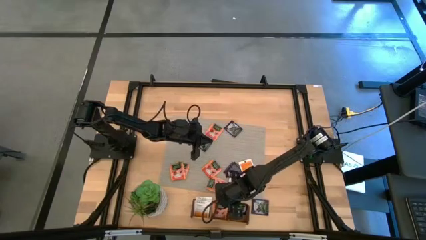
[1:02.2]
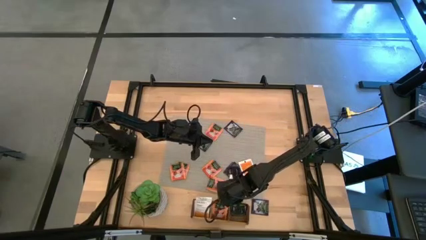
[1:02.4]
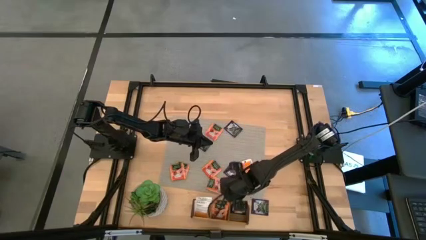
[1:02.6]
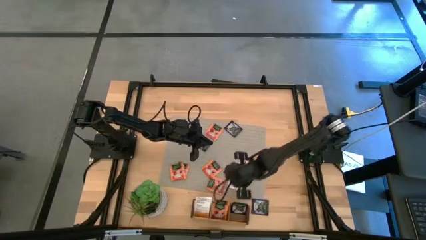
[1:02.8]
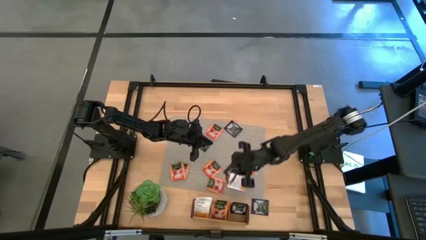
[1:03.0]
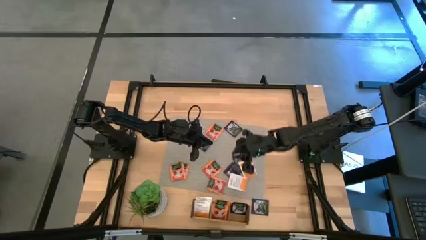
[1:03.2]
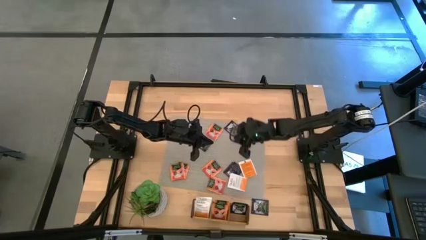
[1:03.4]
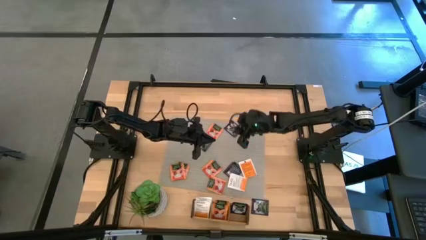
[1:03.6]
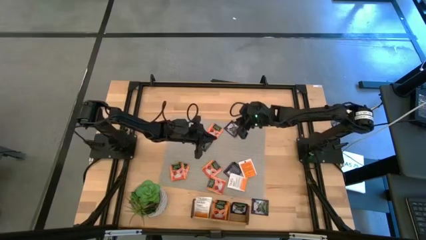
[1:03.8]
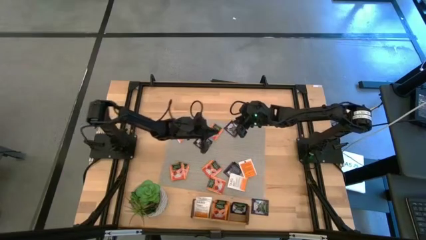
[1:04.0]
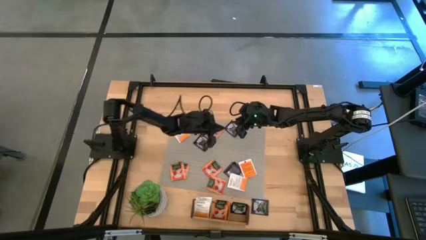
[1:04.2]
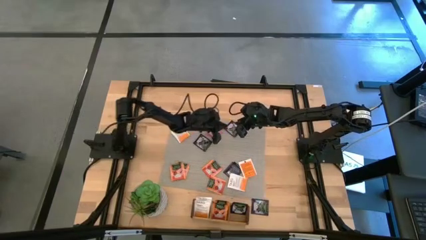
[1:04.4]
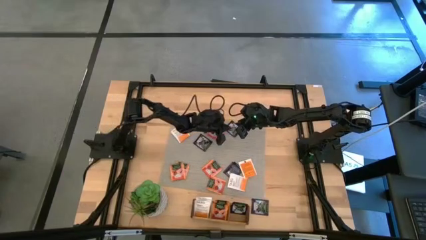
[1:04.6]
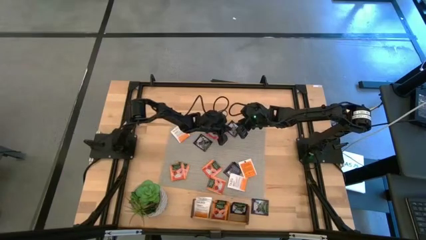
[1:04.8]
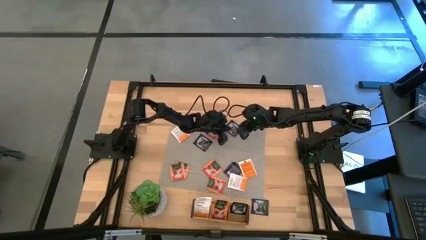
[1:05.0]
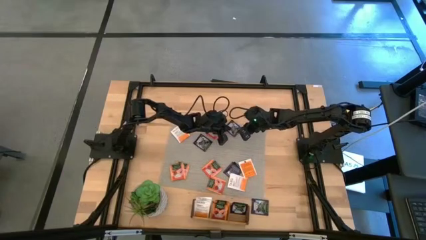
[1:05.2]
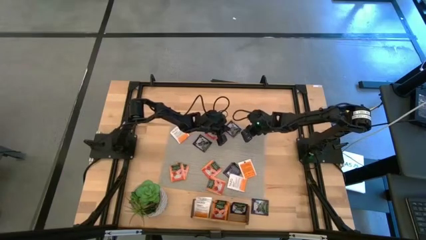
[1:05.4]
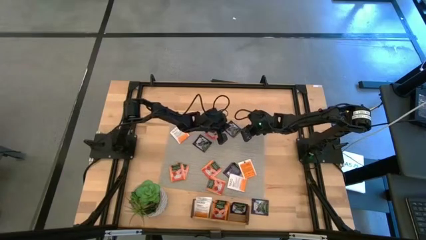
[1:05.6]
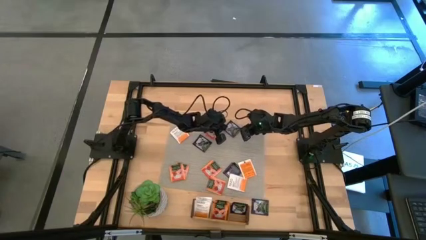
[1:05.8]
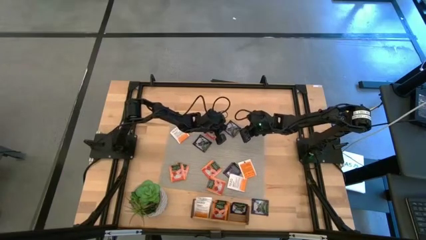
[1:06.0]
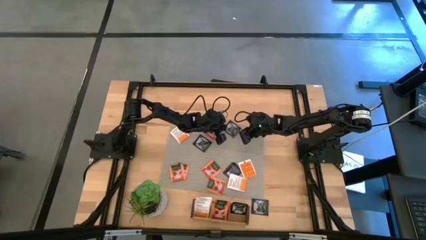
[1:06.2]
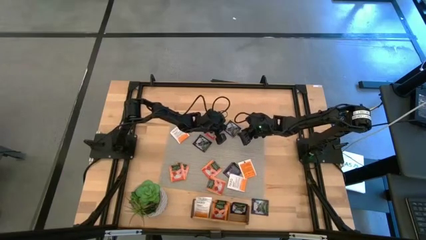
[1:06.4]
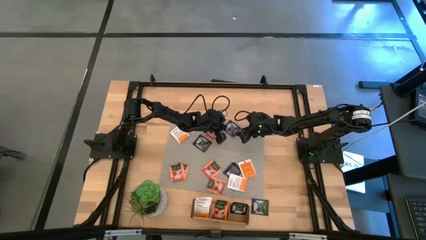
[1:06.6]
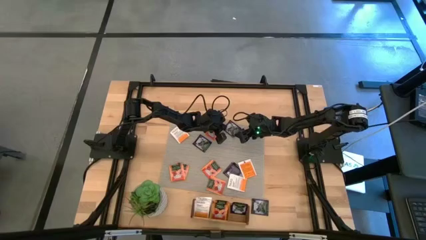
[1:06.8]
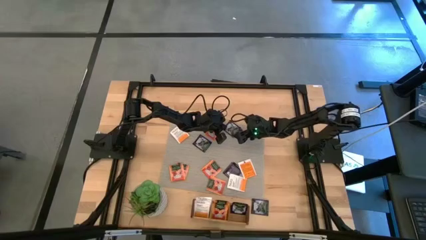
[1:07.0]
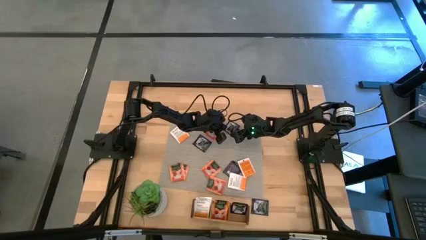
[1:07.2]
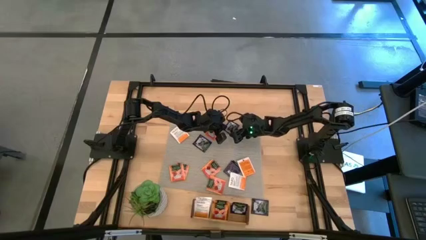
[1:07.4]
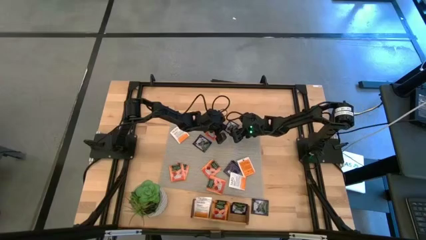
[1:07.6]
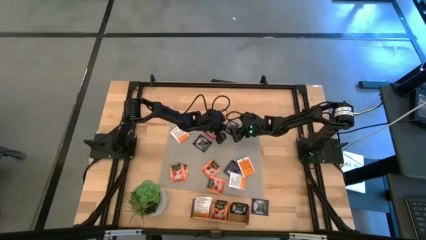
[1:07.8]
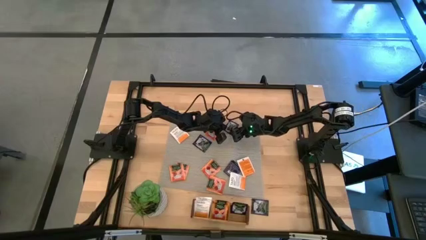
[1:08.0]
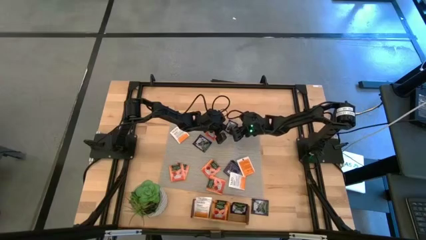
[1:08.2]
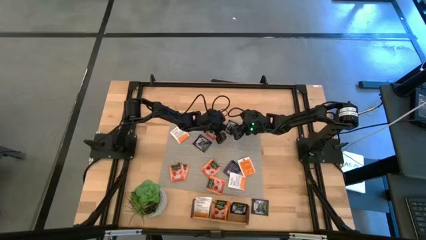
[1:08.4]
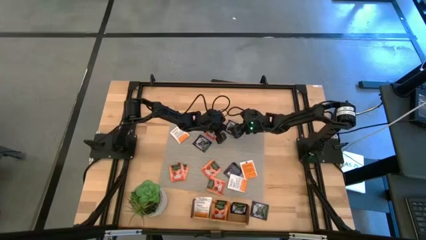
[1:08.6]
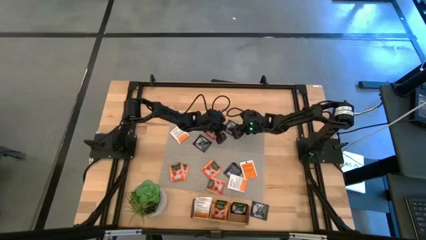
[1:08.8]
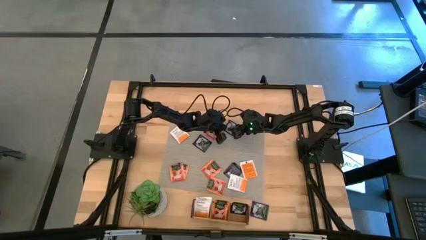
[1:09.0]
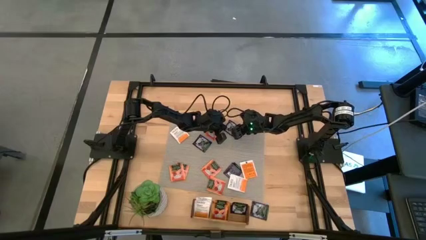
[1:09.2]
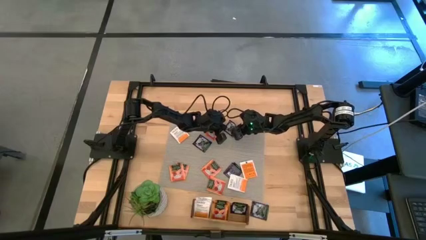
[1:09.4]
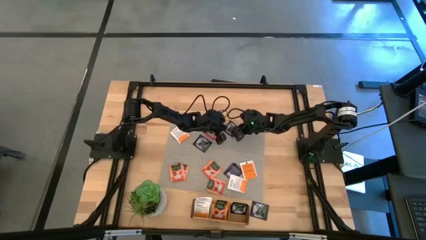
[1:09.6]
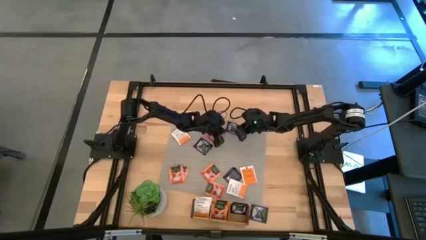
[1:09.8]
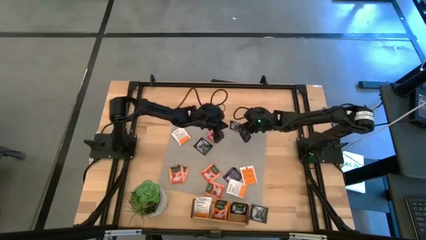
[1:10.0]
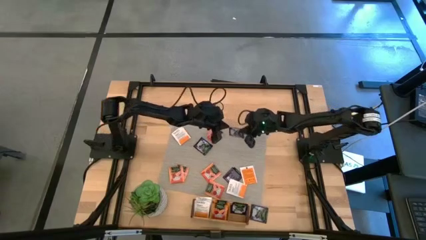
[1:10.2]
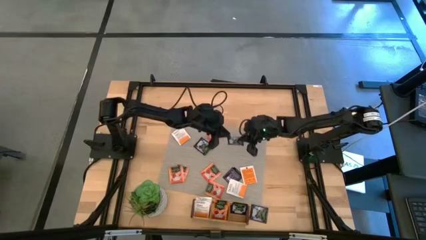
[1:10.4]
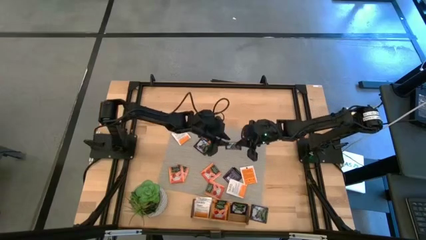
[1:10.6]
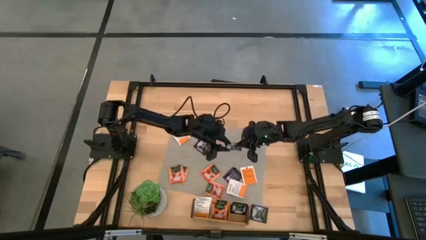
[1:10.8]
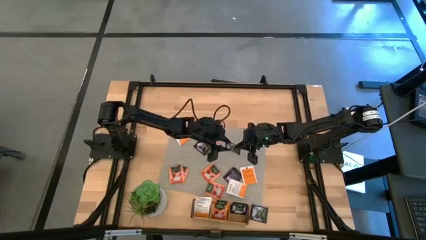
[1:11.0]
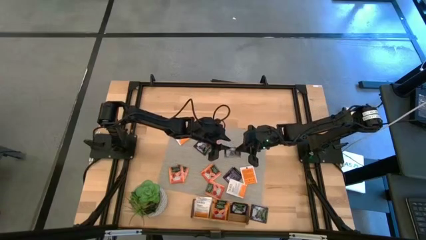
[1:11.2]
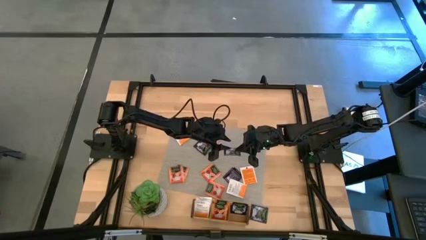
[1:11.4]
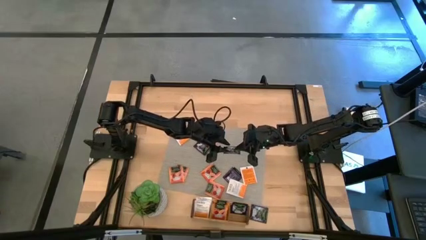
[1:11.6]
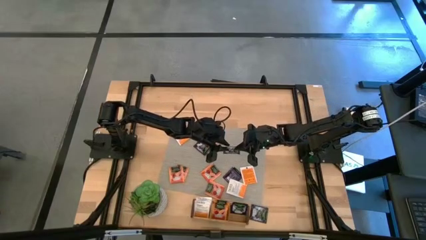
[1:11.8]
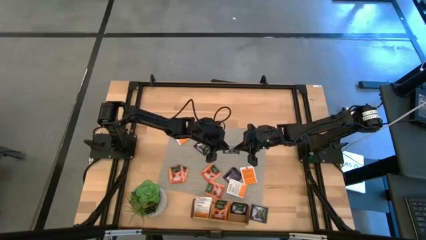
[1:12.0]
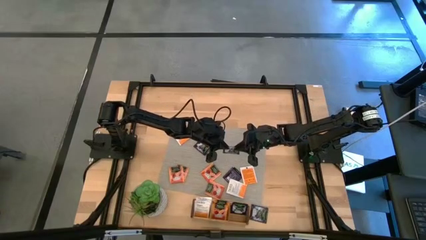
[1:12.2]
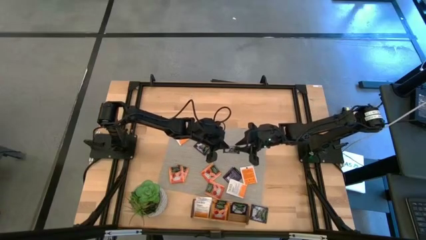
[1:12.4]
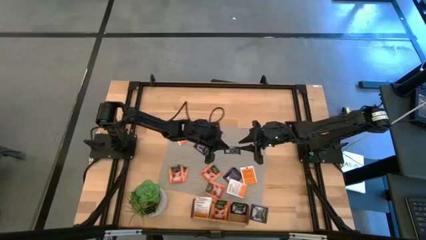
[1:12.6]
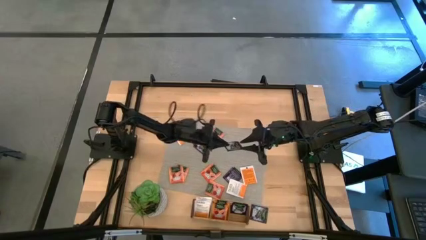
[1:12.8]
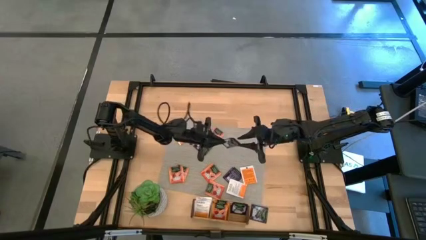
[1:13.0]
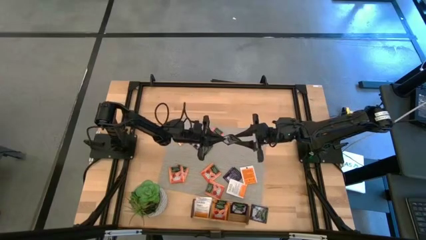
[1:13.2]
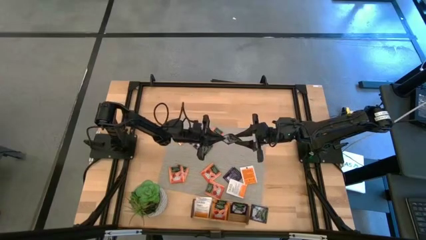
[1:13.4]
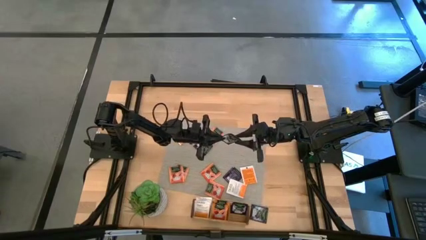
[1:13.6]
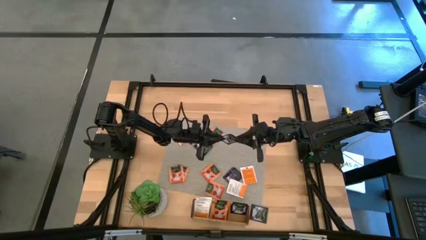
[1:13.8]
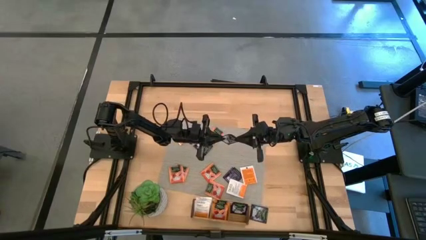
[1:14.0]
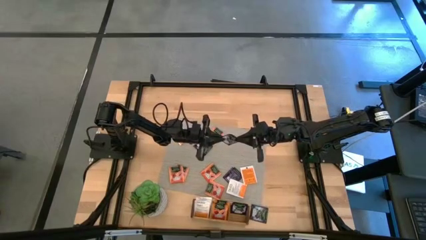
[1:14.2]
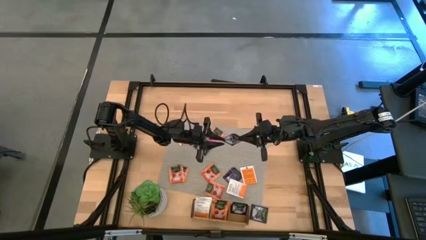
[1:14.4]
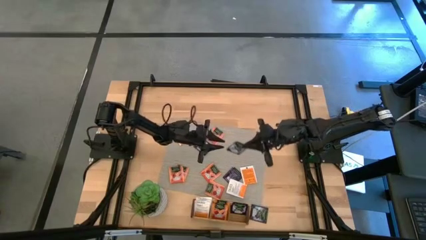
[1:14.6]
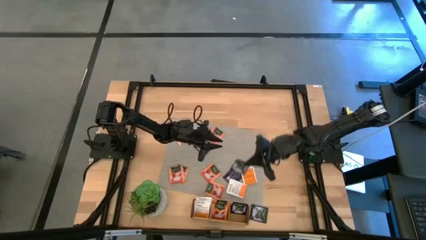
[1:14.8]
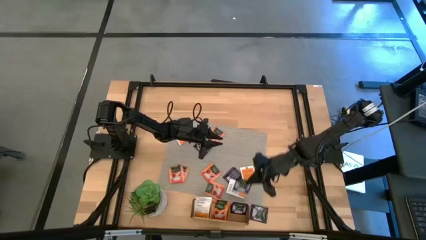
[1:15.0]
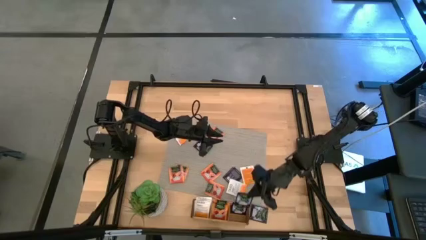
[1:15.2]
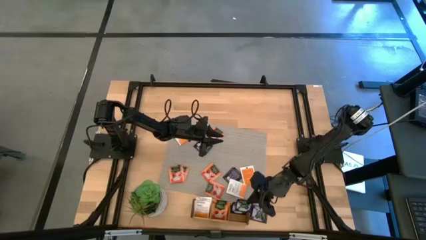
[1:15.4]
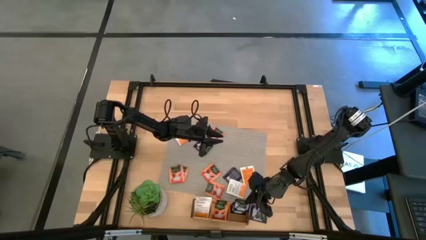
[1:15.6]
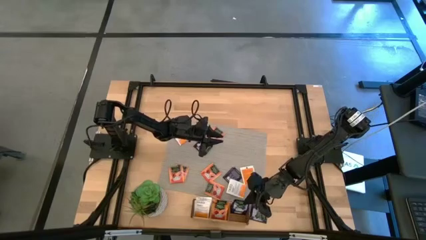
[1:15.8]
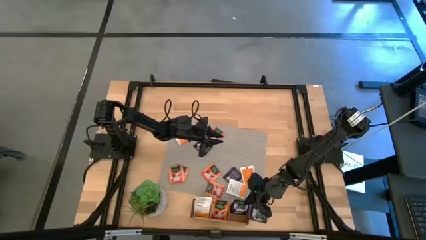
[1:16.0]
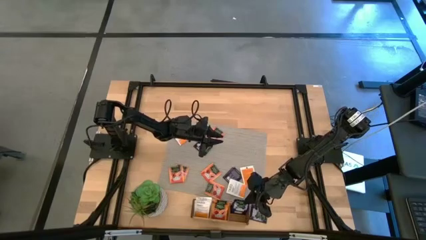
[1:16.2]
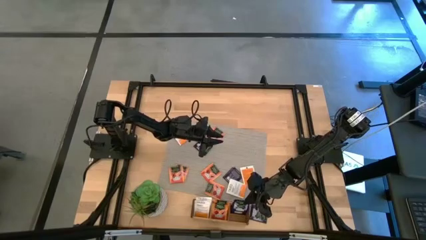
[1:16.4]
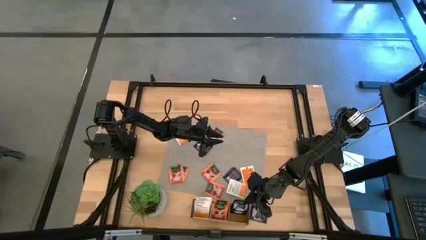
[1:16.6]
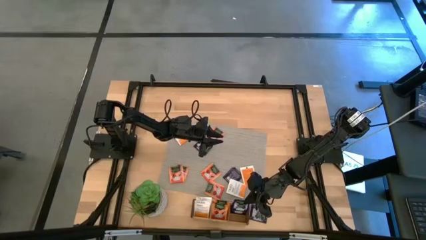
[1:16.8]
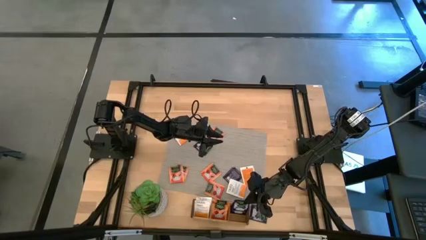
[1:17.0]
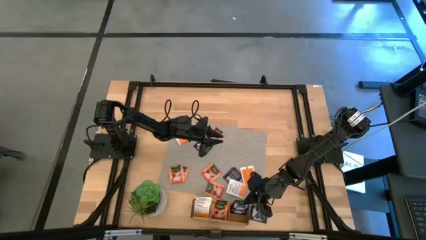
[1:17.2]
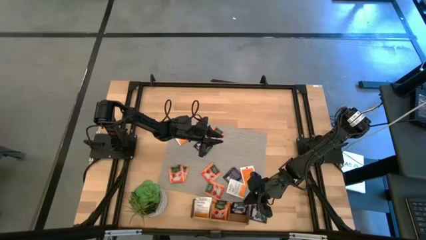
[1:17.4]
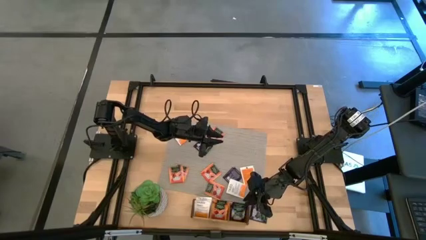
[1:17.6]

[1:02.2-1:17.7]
Task: Pick & Place Tea
Put the black tea bag into the right section of the wooden organizer
